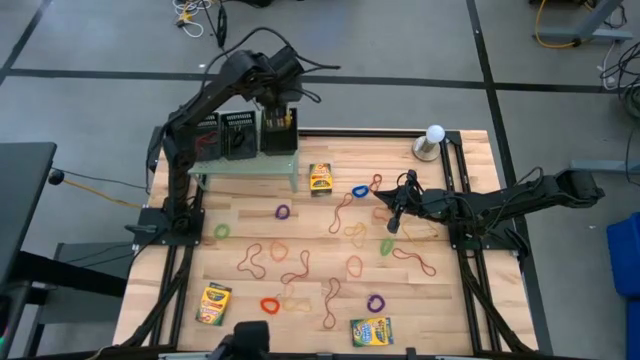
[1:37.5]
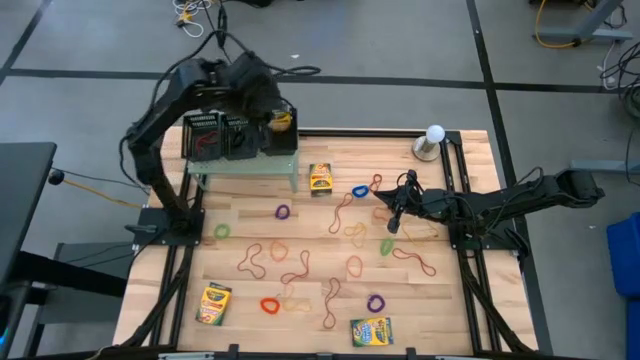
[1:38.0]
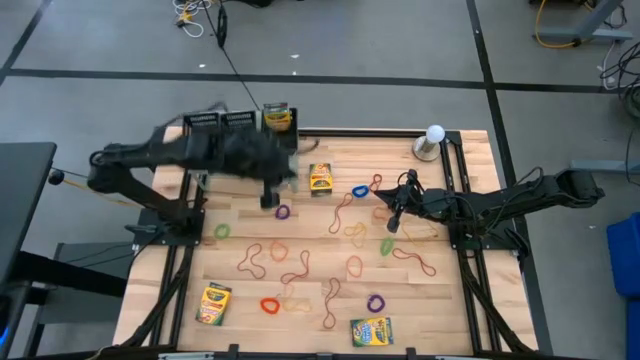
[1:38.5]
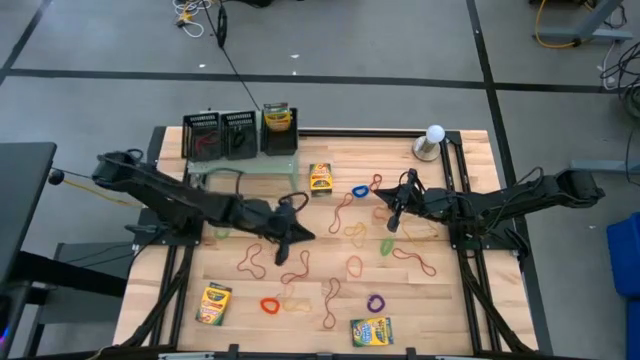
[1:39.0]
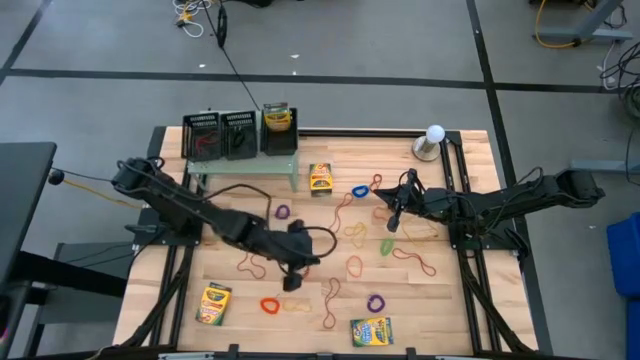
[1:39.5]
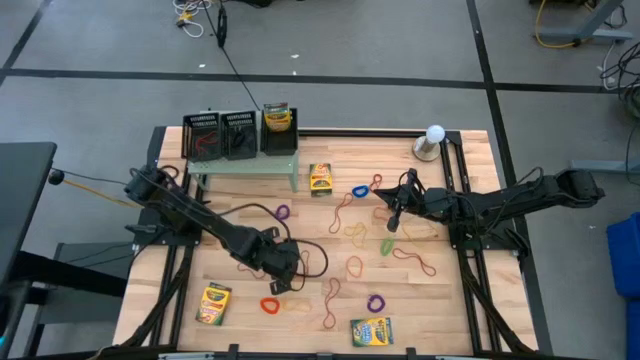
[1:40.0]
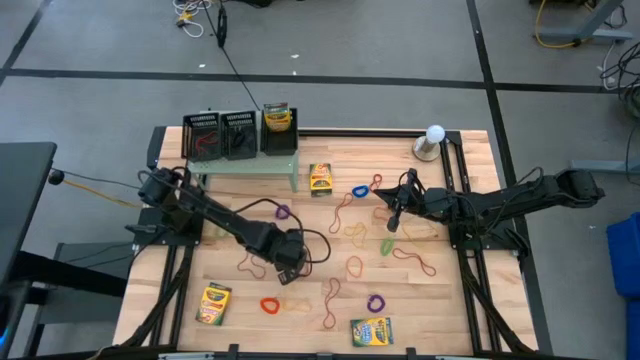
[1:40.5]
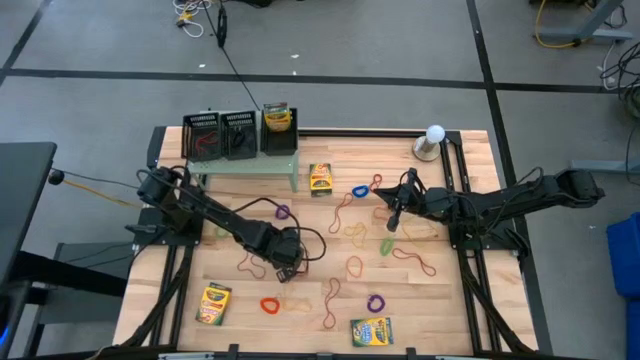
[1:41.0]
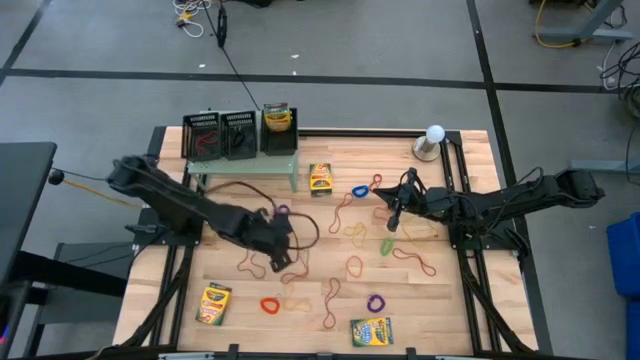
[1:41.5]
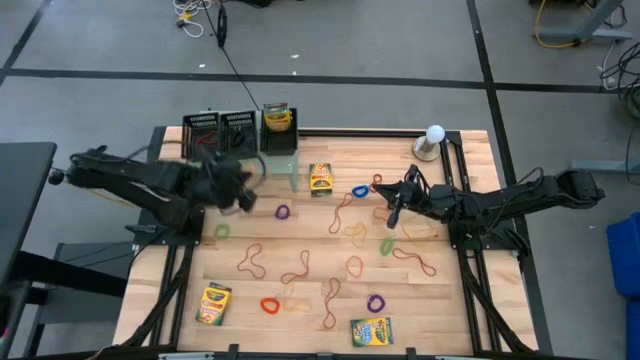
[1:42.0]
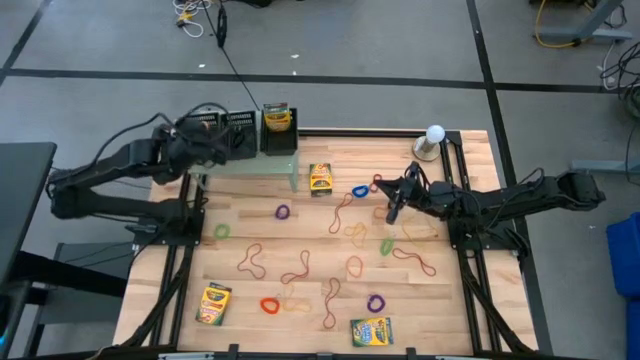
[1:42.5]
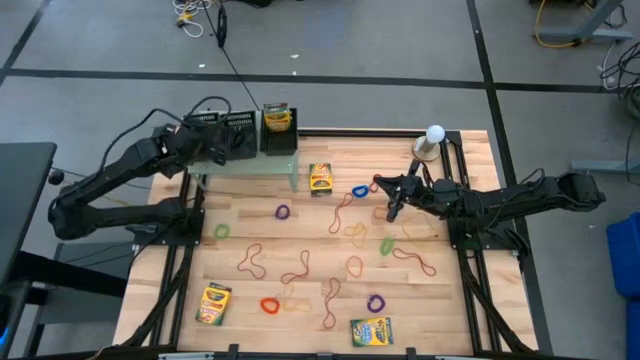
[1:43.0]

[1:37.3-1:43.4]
Task: Pick & Place Office Desk Supplies
Put the orange rubber band into the left black bin on the shelf

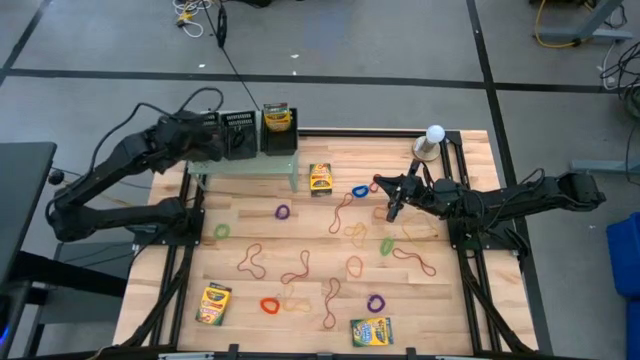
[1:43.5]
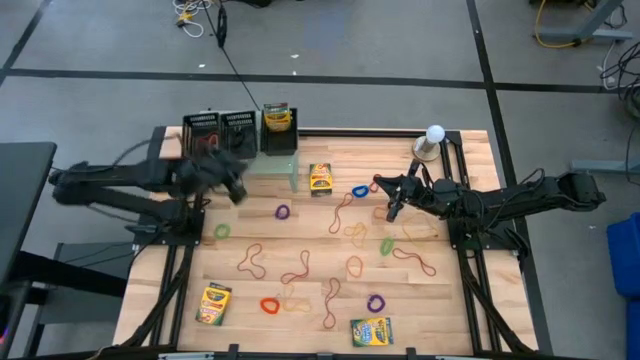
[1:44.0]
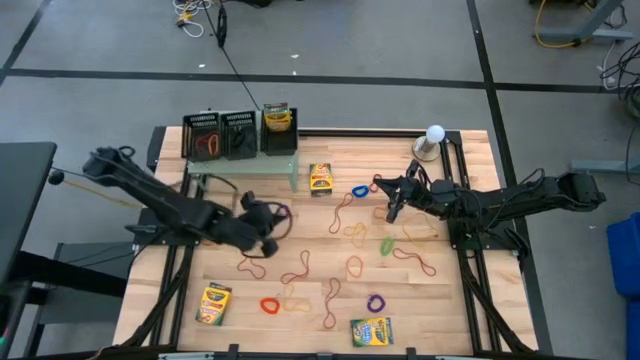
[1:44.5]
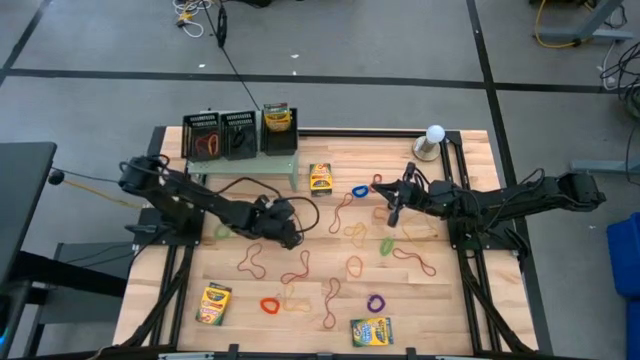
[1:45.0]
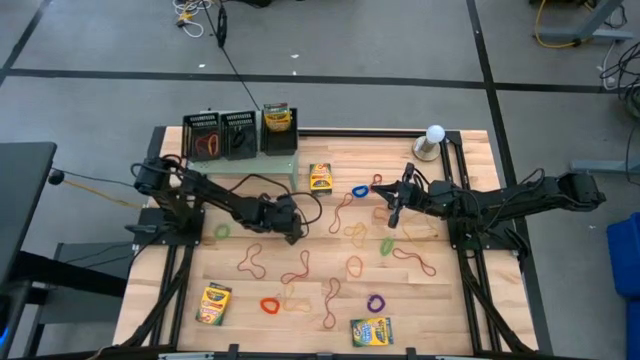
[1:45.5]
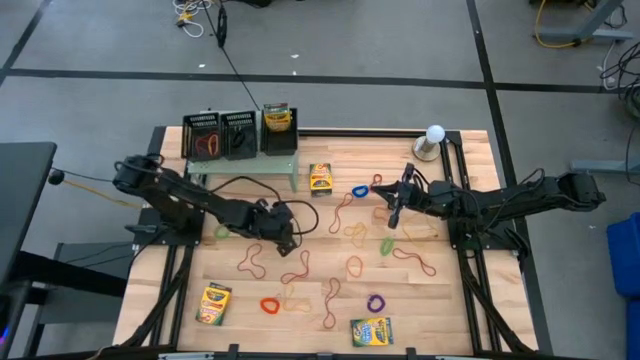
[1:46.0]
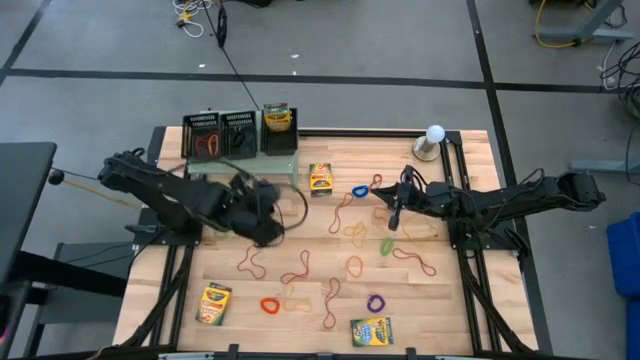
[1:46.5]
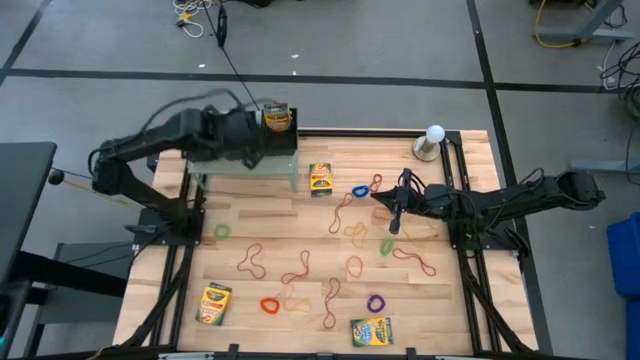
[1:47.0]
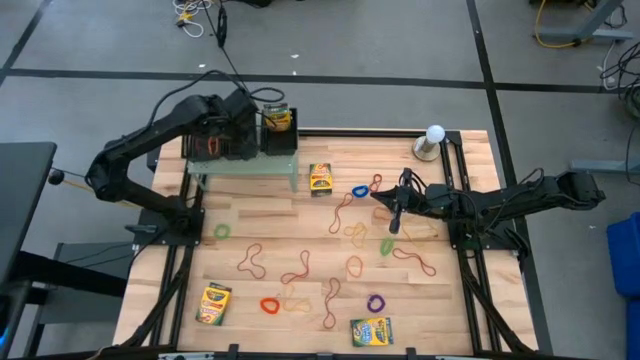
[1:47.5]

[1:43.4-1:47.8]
Put the violet spring keychain into the middle black bin on the shelf

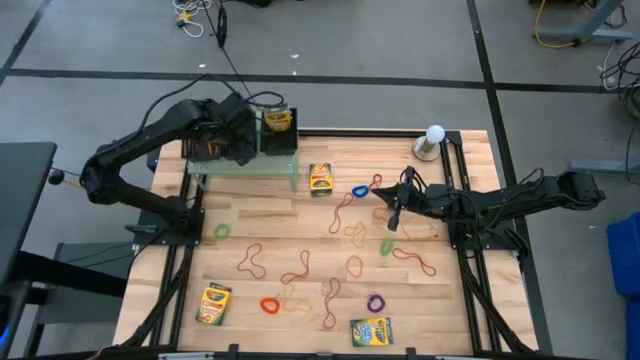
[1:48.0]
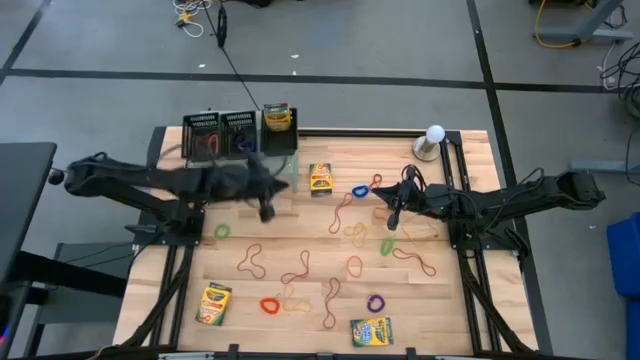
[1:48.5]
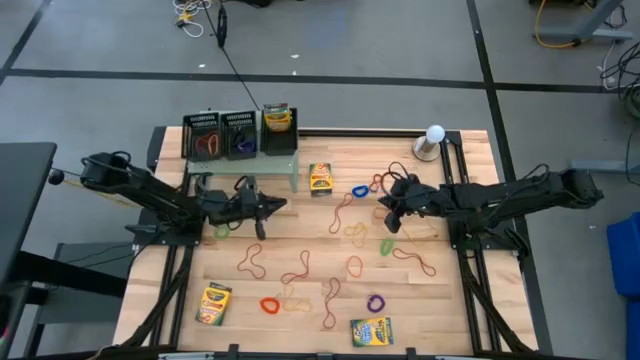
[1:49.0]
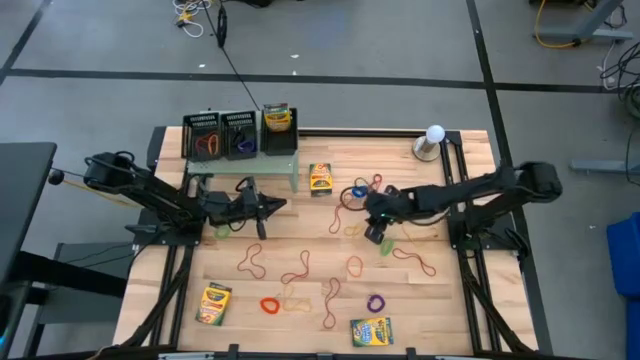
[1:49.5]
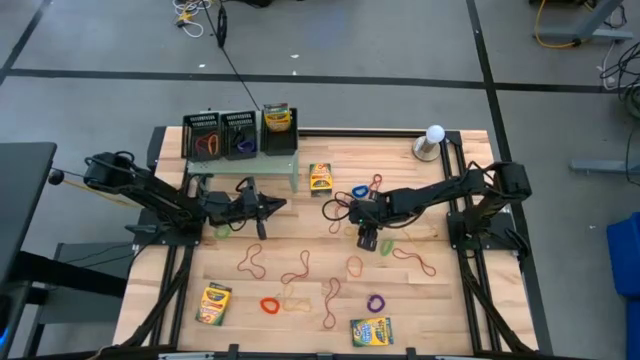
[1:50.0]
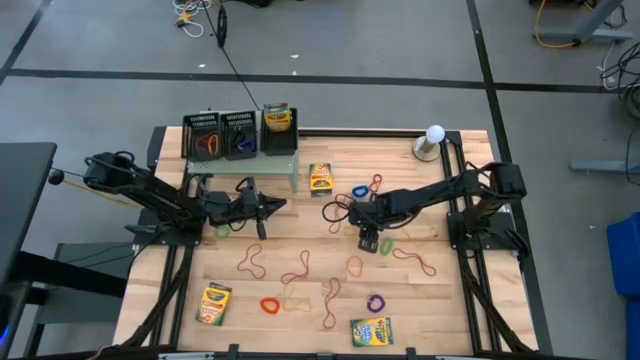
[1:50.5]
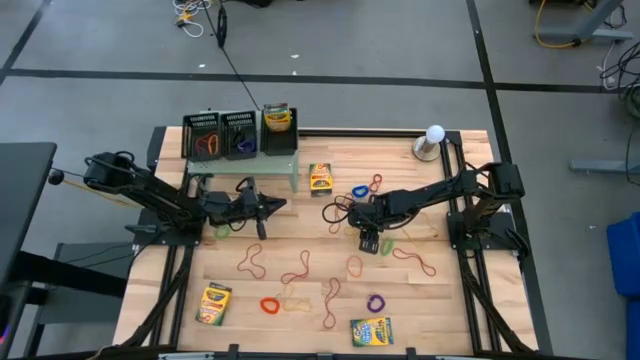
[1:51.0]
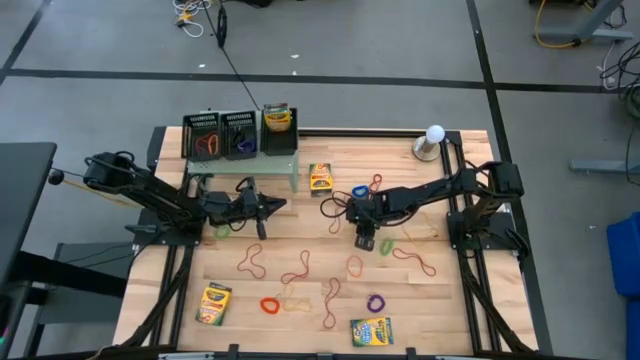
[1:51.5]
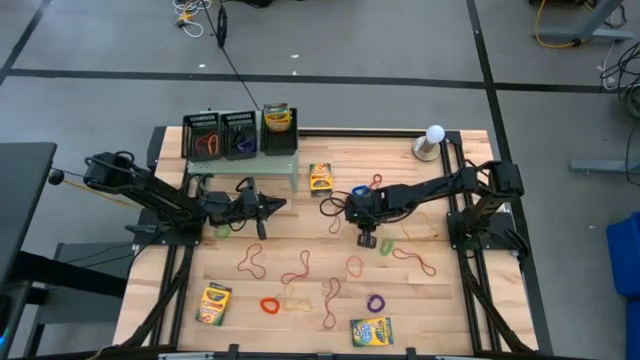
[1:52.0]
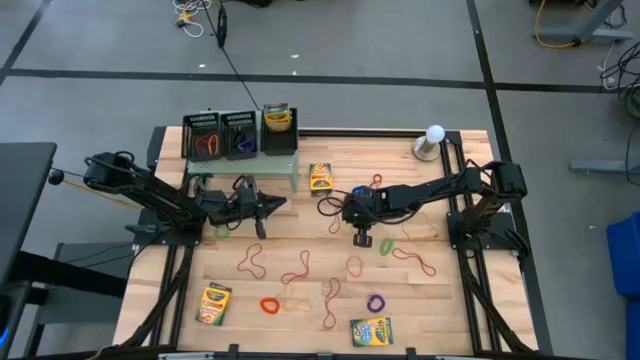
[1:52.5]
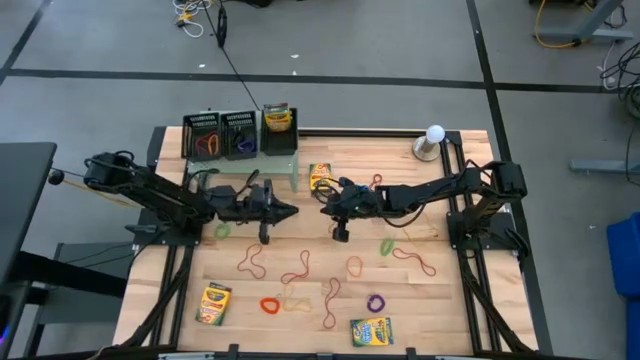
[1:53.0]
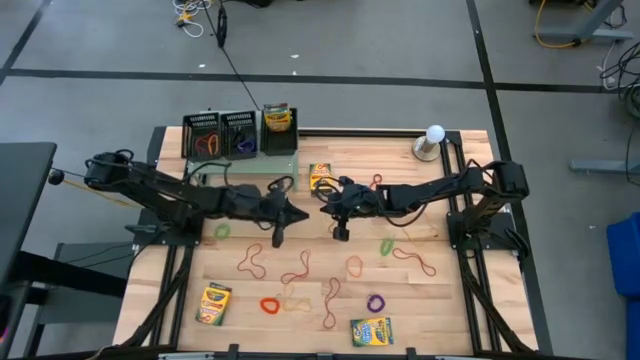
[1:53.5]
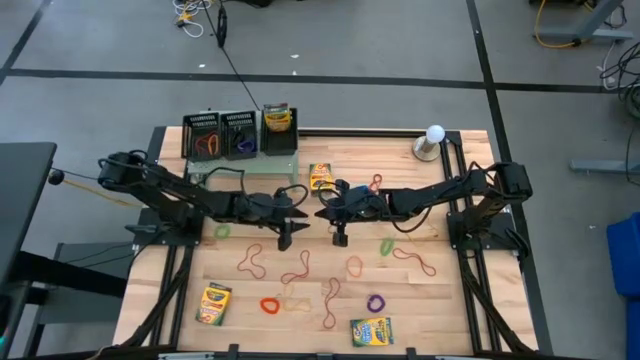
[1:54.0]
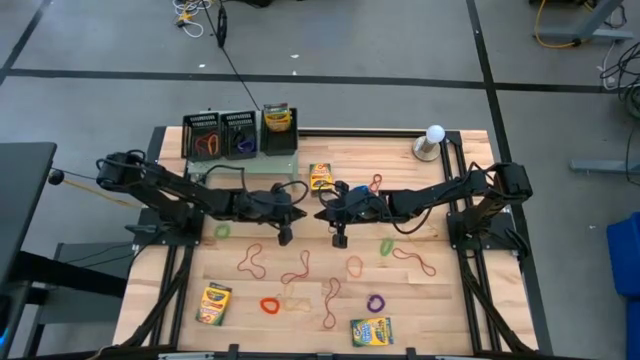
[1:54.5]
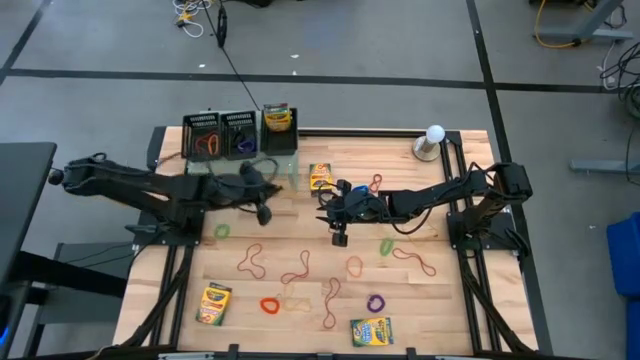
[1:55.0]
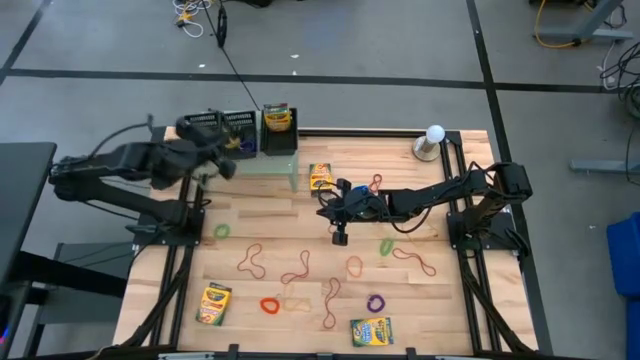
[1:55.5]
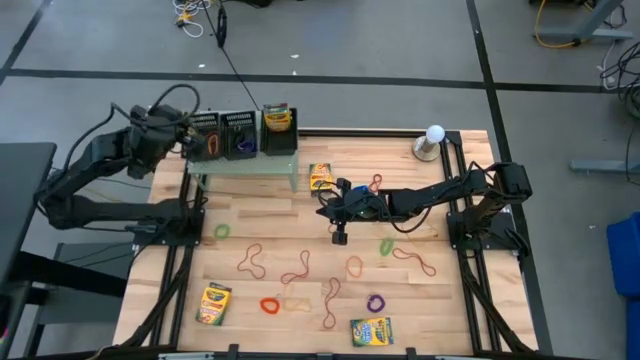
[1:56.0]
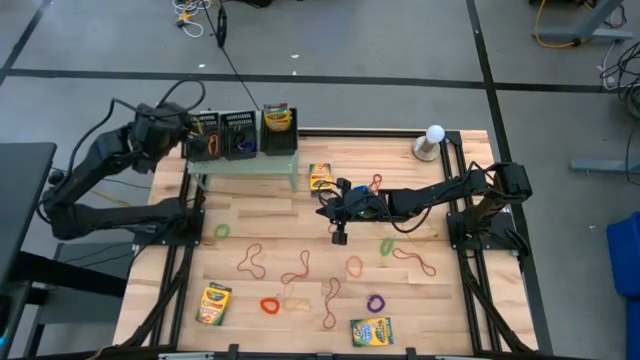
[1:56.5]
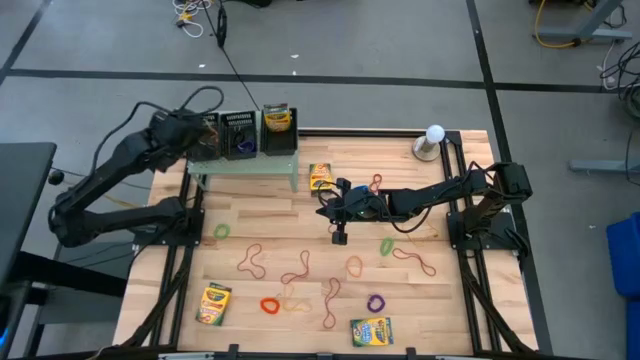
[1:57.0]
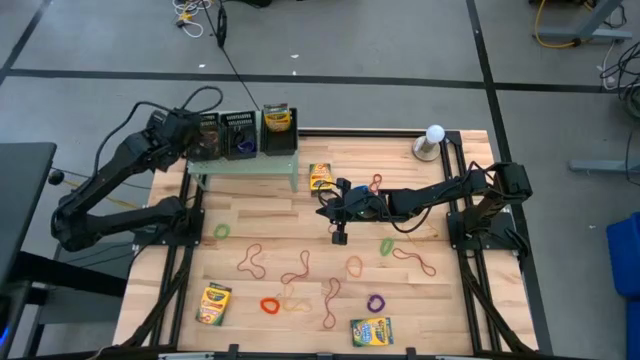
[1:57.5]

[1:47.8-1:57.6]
Put the yellow rubber band into the left black bin on the shelf
